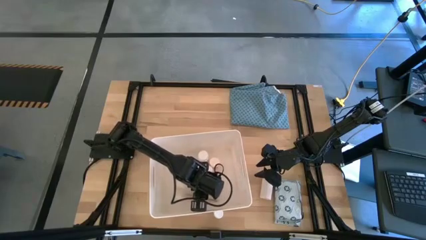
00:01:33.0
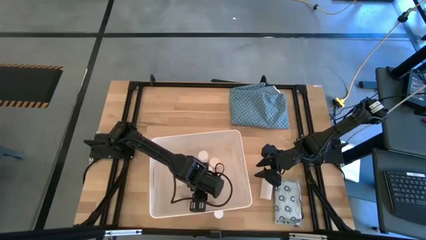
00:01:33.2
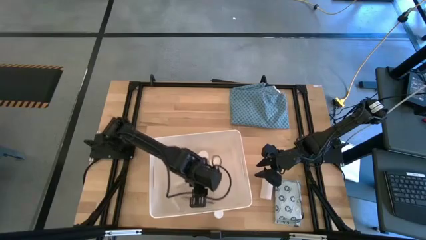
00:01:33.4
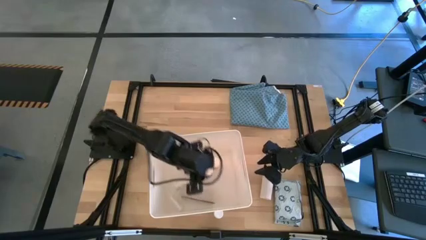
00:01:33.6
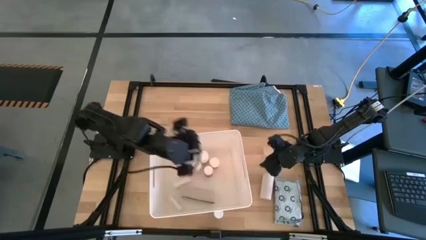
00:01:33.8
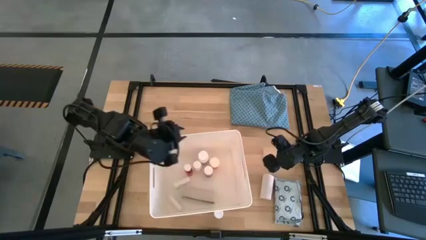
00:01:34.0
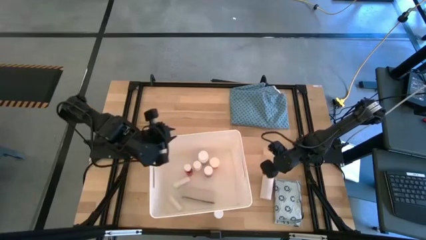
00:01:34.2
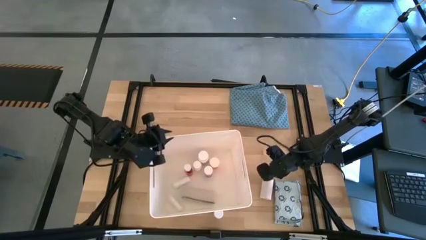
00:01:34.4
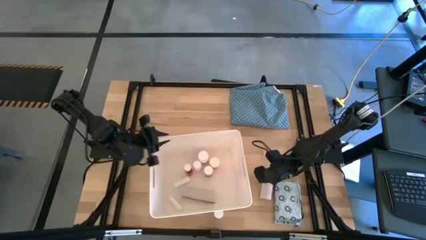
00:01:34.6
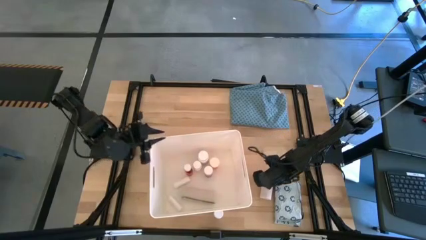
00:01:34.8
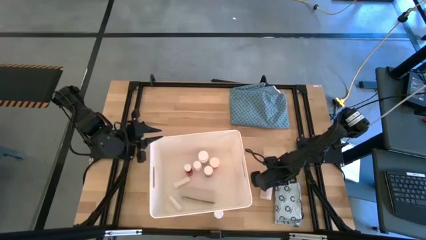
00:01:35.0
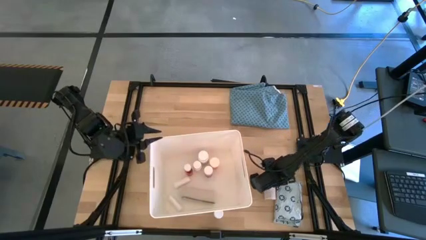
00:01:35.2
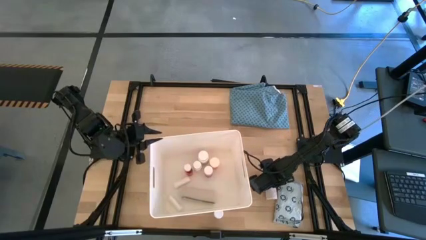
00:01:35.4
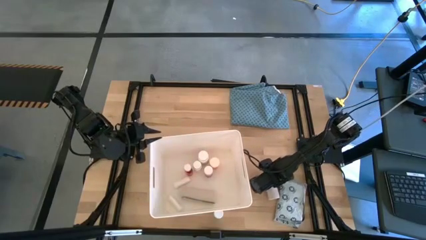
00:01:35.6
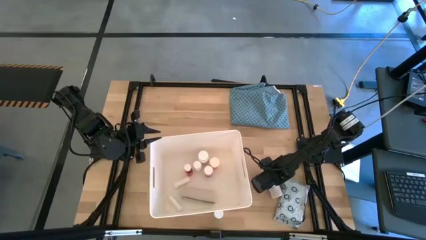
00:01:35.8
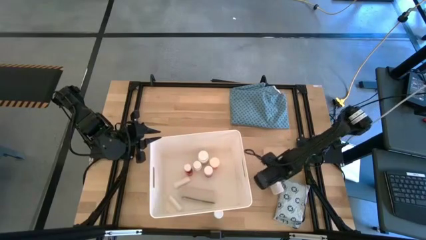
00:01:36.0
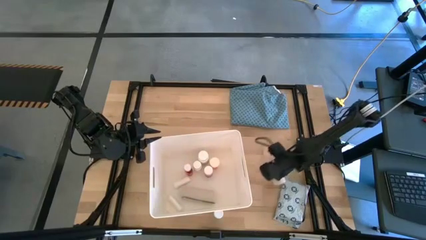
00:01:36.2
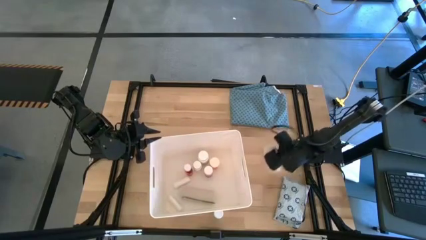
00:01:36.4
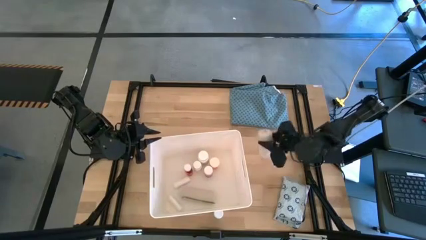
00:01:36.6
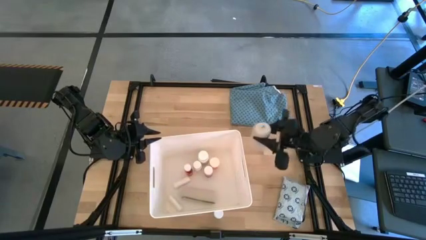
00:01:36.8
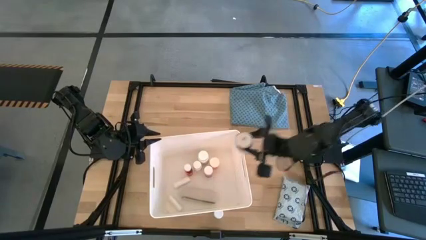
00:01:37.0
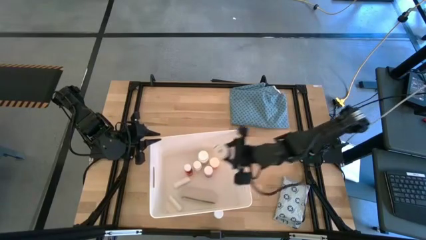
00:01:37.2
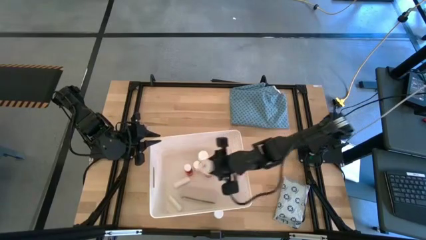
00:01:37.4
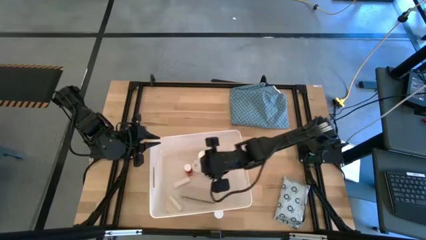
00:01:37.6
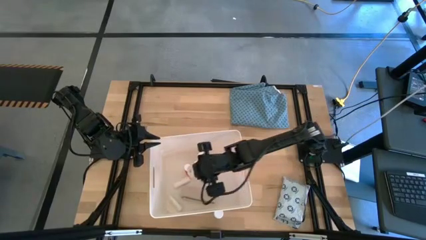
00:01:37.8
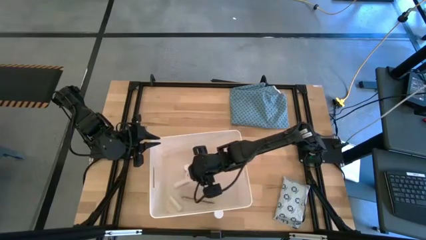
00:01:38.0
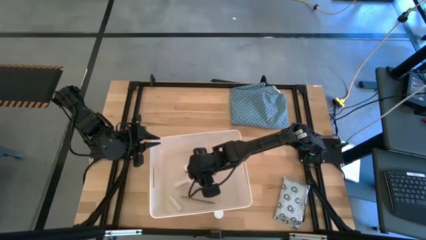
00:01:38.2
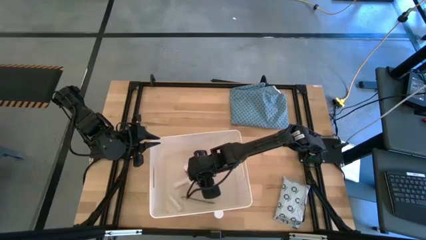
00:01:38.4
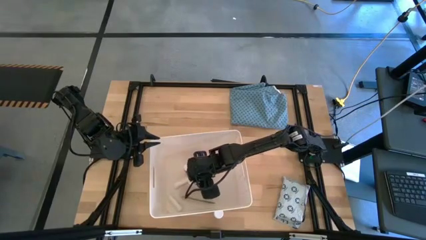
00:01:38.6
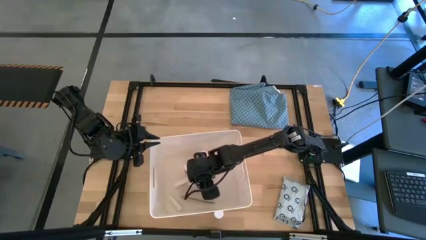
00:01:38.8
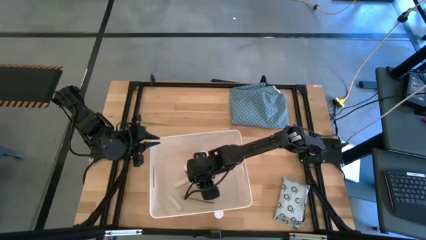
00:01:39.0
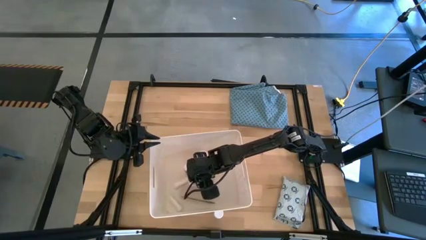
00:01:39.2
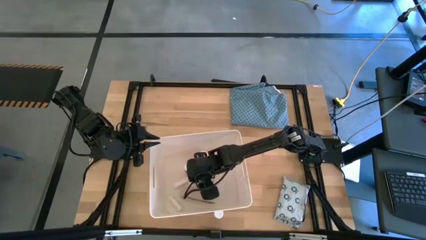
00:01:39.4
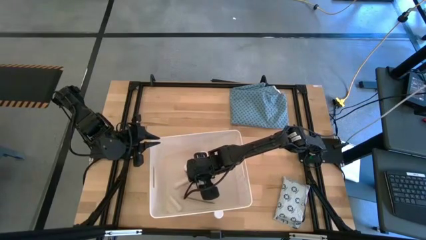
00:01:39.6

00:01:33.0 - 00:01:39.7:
Task: Pick & place medical supplies in basket/bin
Put the white bandage into the white bin

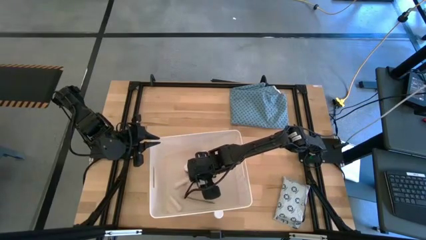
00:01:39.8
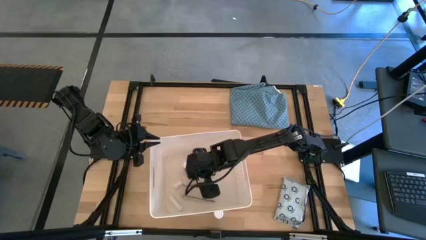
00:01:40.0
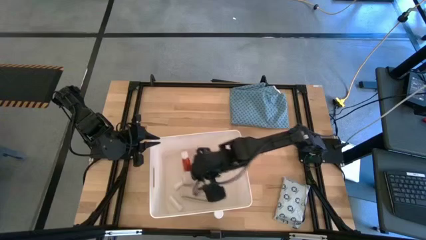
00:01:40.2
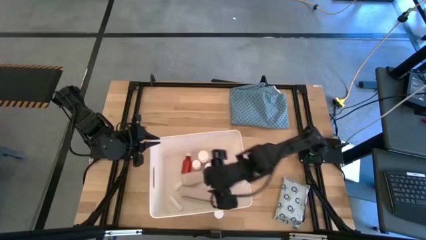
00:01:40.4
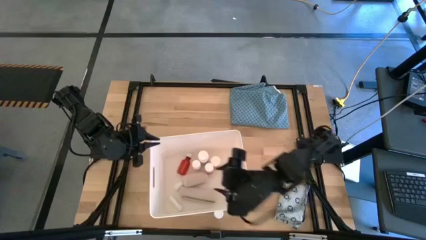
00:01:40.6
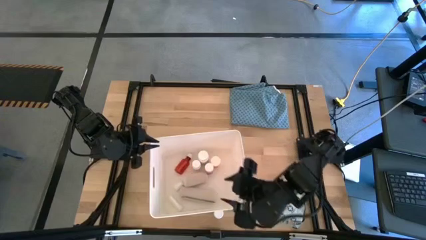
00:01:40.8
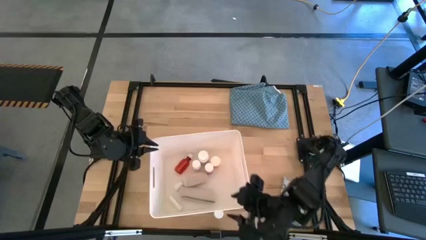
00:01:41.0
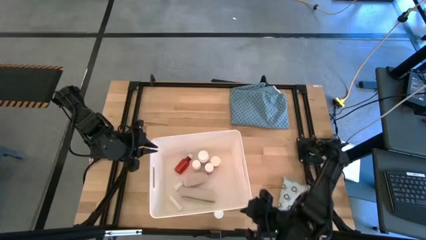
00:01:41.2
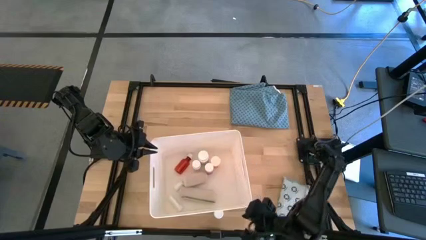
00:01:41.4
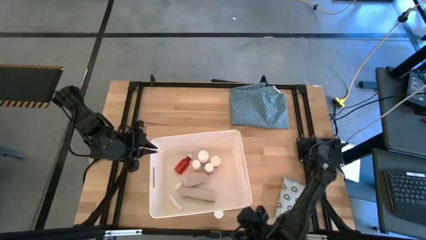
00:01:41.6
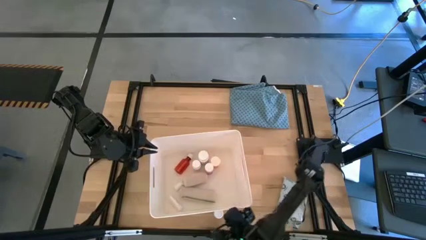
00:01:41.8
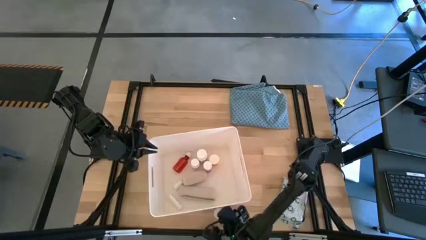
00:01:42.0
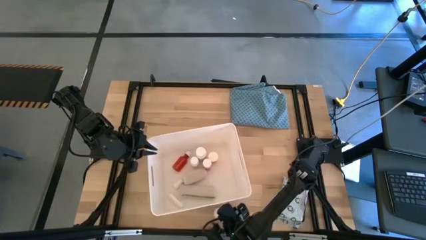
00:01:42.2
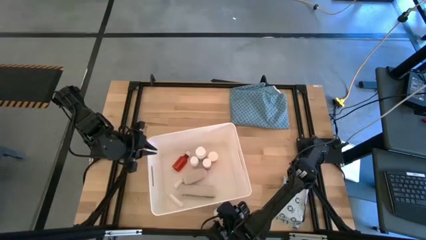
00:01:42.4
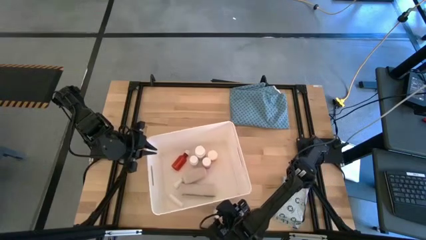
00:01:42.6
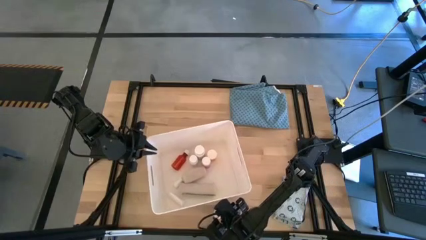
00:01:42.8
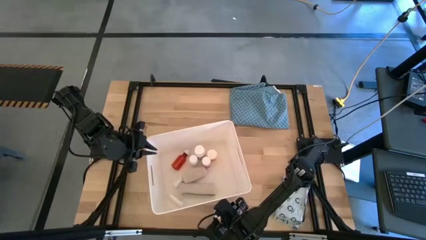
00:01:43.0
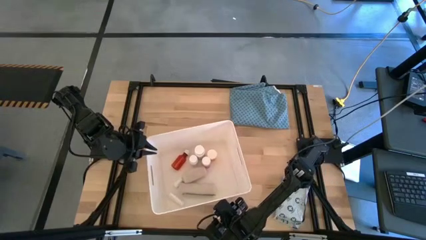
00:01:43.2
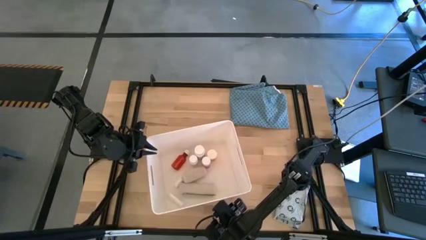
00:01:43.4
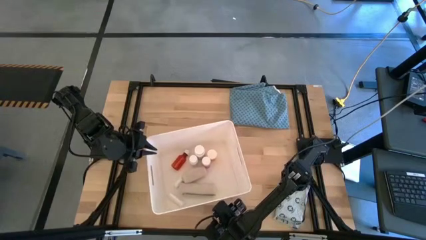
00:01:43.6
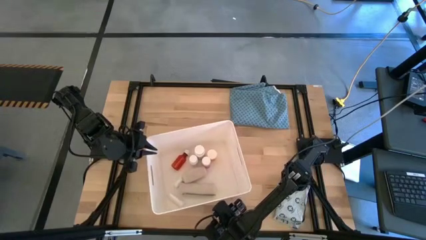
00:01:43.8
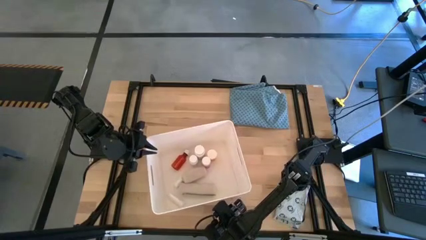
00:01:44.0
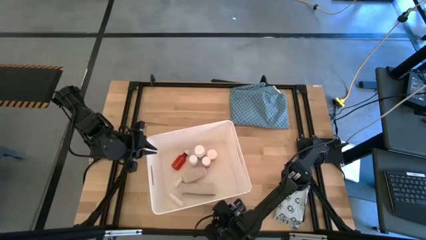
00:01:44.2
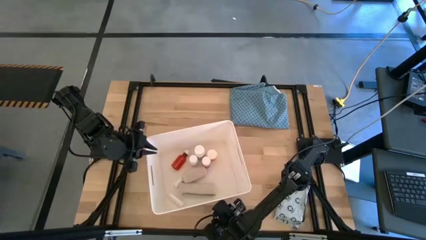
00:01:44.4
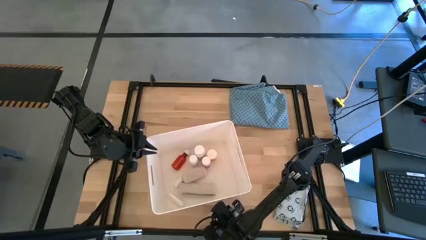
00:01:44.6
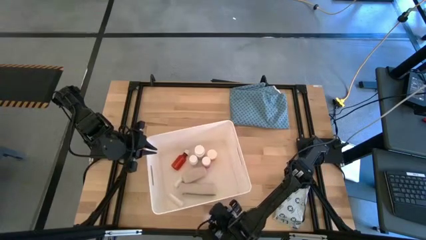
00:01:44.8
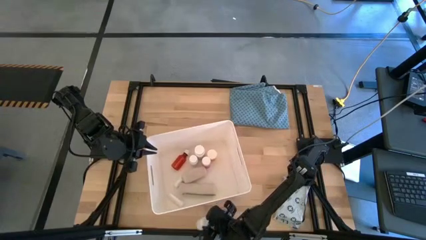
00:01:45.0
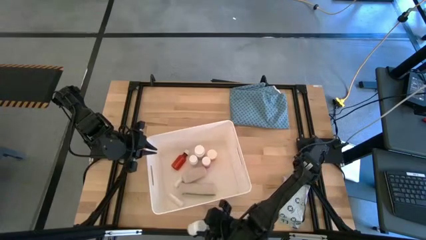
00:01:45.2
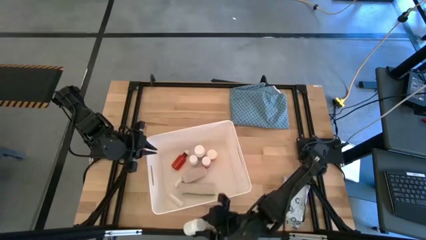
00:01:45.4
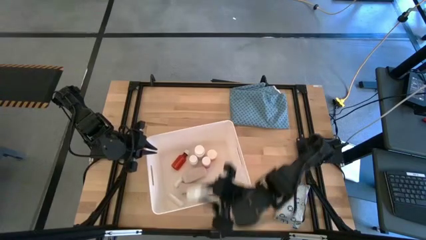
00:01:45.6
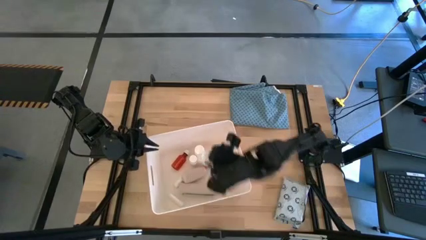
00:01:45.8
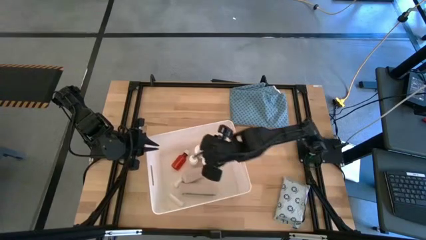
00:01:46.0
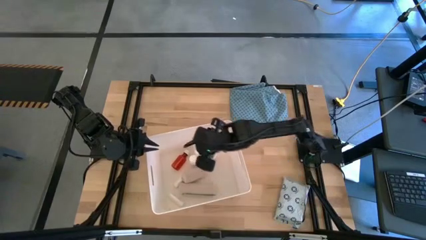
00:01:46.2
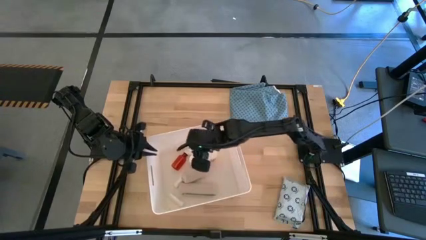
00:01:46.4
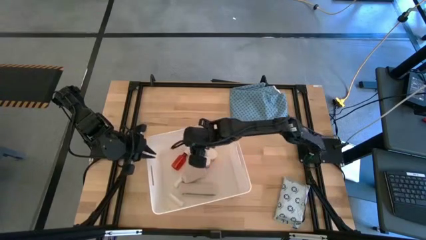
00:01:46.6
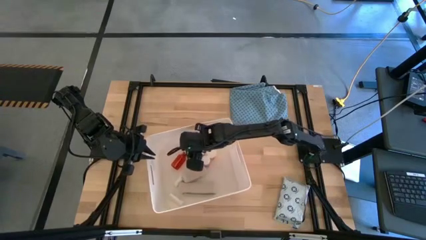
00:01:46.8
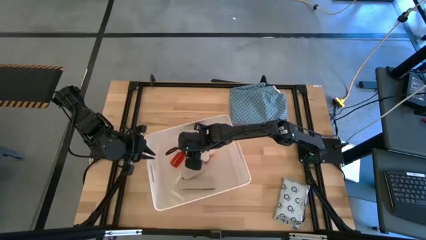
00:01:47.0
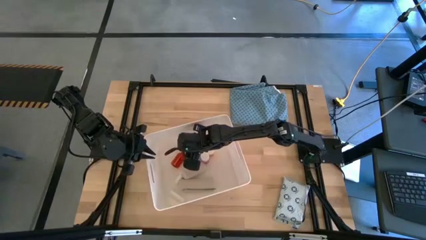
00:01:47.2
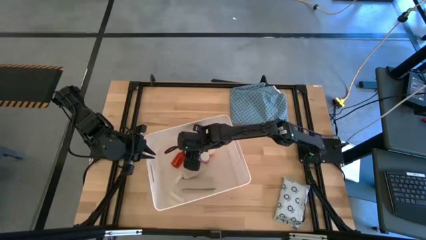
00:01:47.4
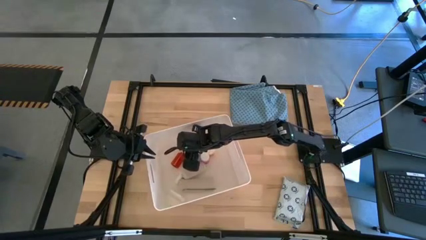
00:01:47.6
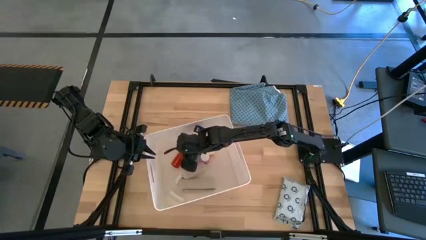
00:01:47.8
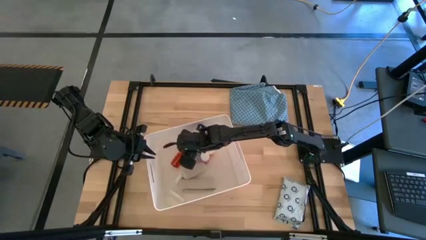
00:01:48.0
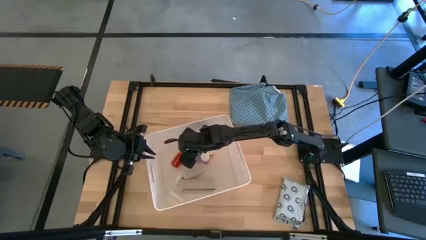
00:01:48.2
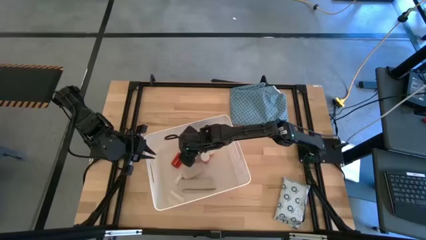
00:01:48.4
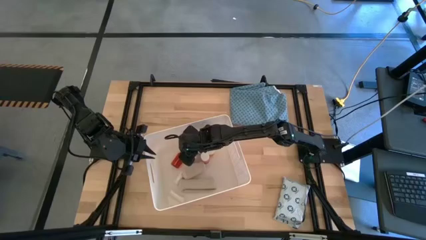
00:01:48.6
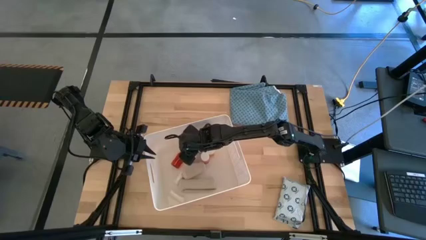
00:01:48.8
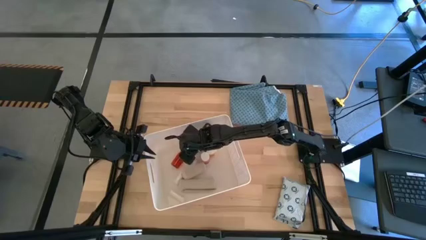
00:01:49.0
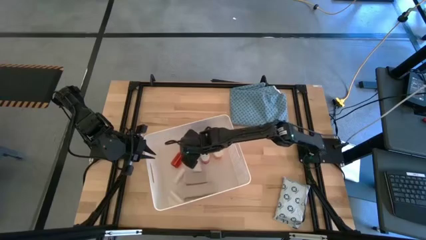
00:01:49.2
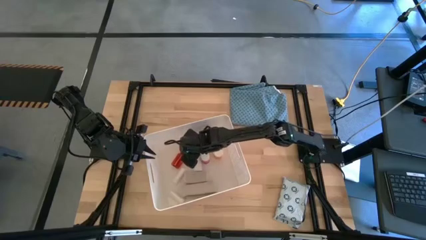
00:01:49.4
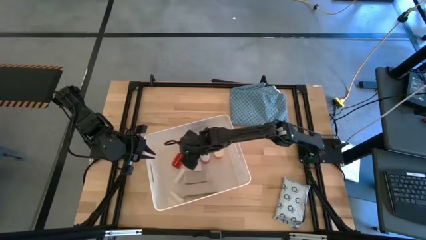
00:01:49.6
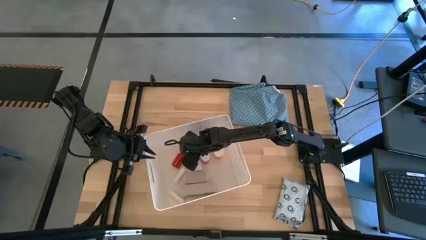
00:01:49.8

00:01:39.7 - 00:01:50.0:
Put the white medicine bottle into the white bin
